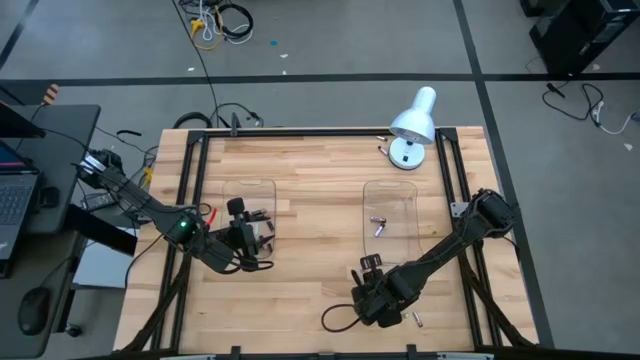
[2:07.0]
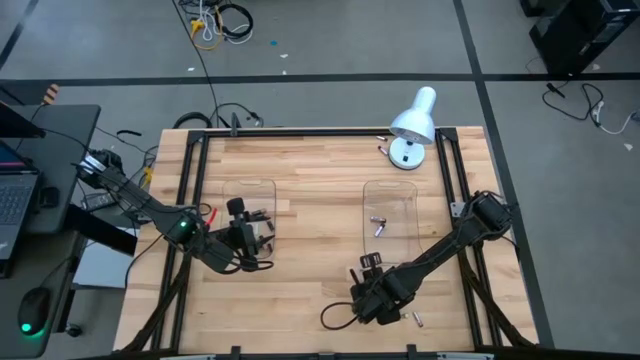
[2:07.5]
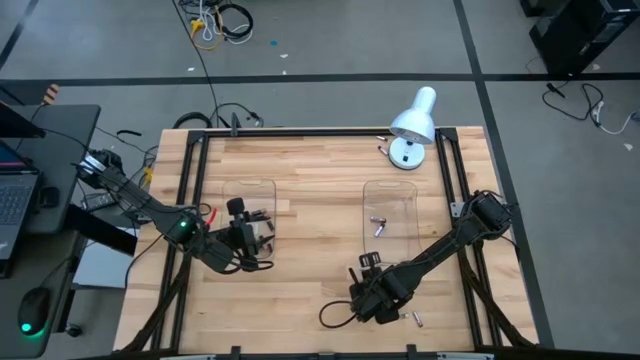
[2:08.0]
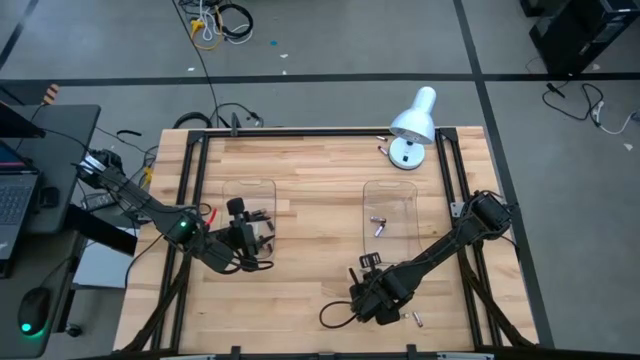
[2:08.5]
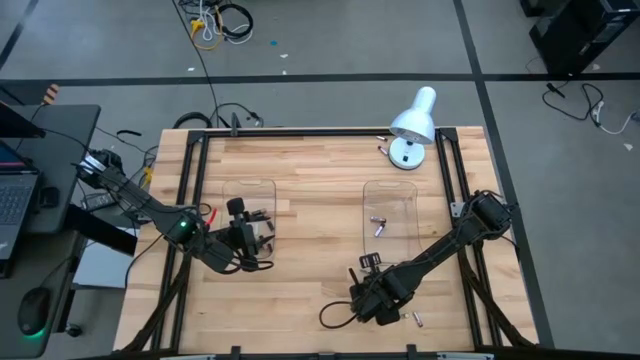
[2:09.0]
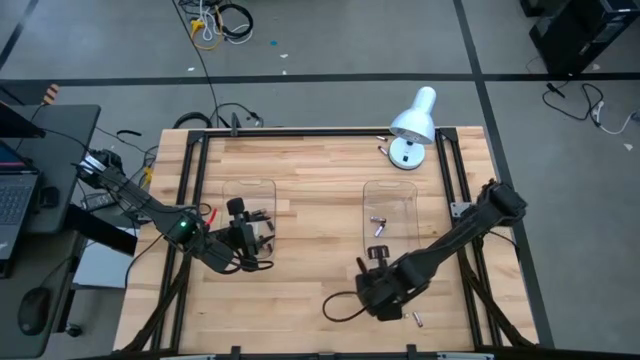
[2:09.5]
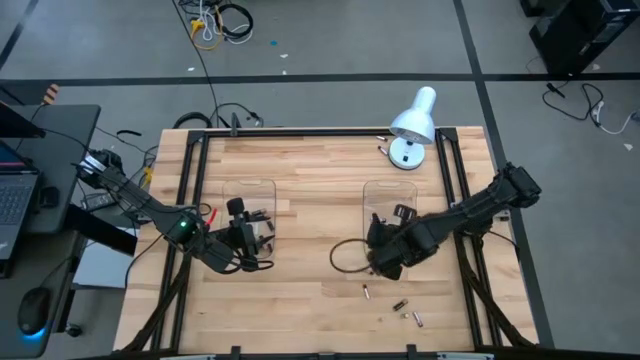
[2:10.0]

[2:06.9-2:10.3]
Task: Sort batteries
Put the silver battery into the right transparent bin

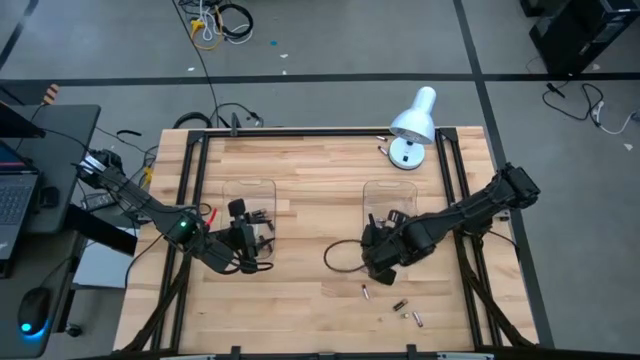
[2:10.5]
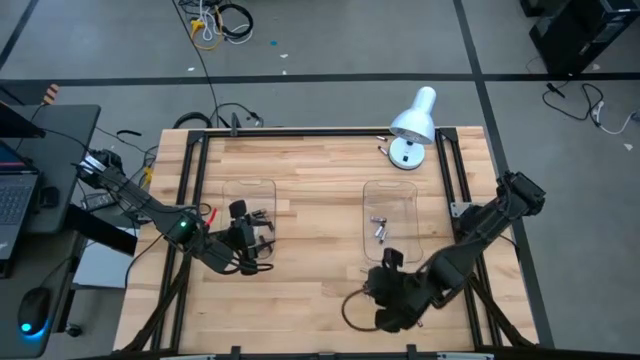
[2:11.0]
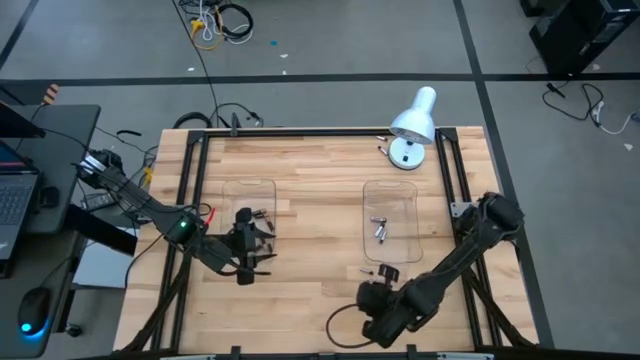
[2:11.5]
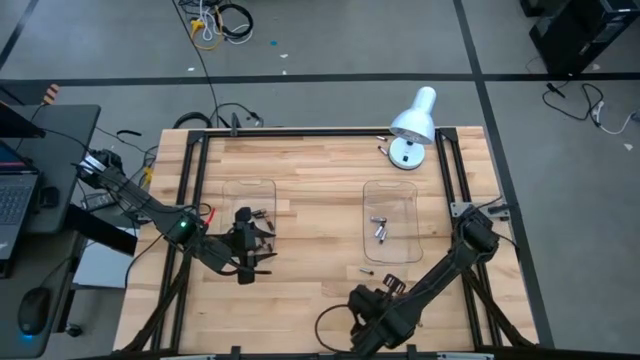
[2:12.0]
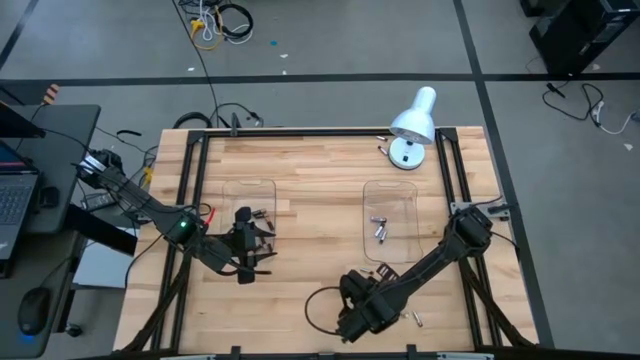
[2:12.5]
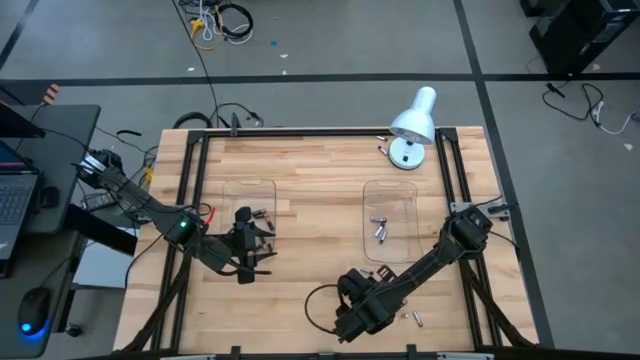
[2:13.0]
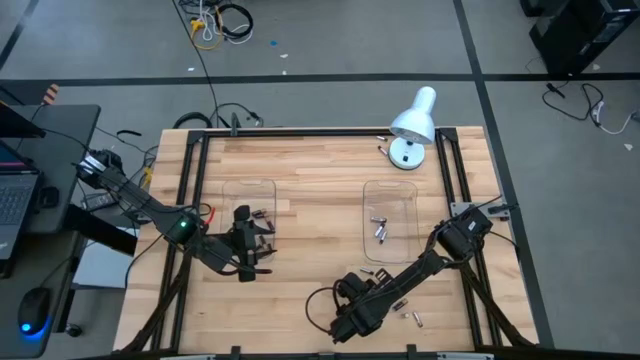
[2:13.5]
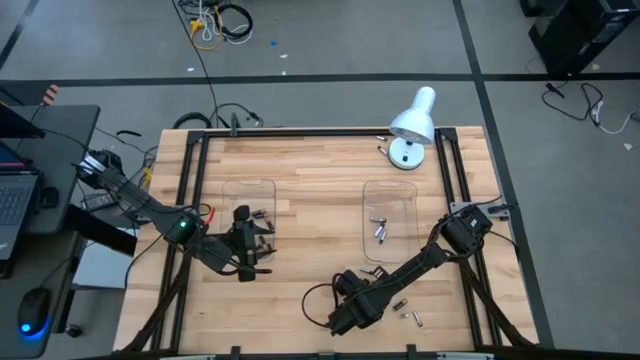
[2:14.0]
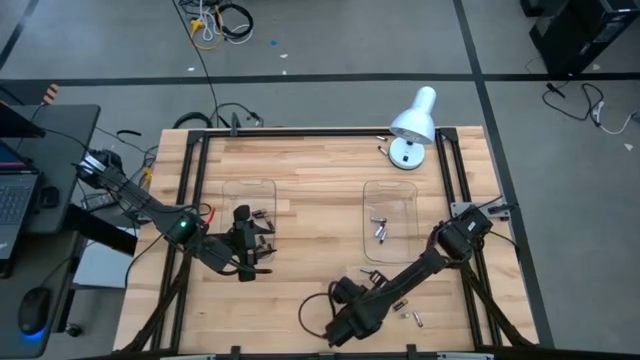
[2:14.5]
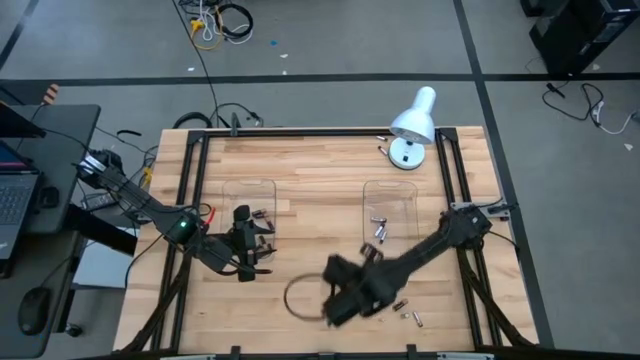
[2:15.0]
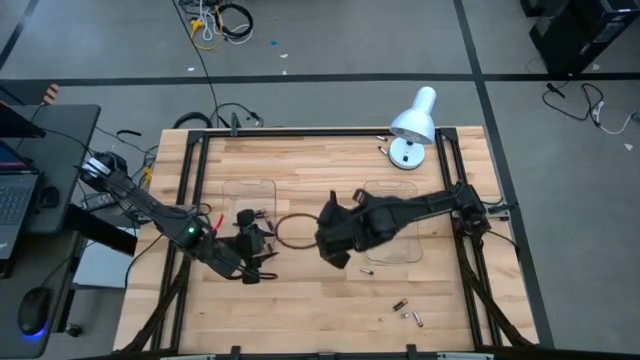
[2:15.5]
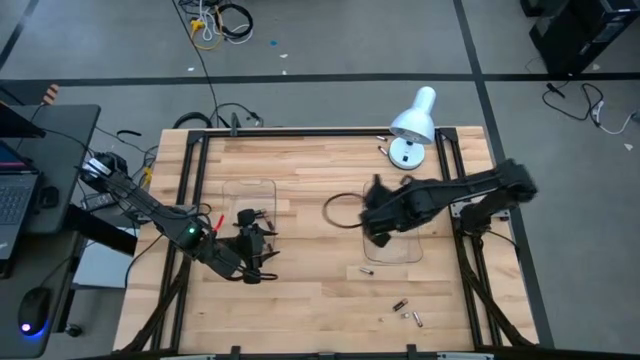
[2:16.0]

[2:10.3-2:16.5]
Put the silver battery into the right transparent bin

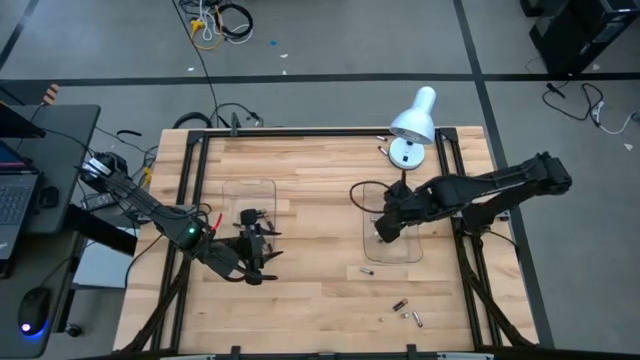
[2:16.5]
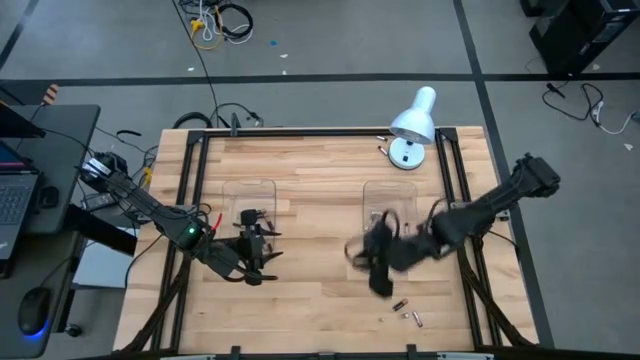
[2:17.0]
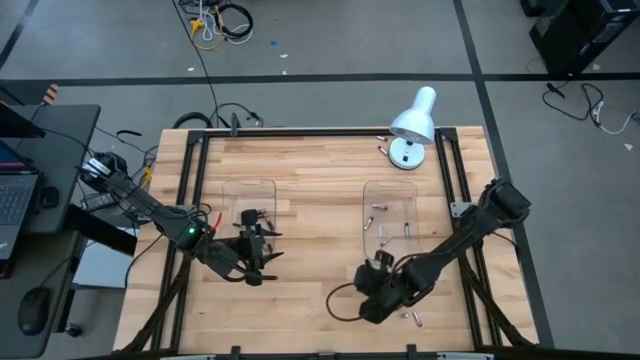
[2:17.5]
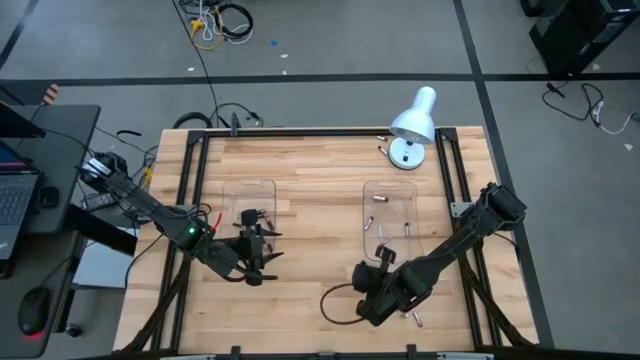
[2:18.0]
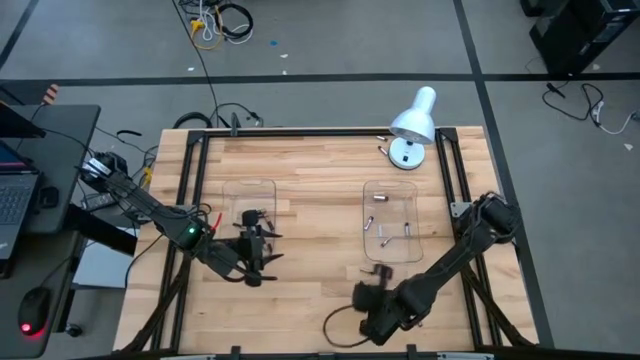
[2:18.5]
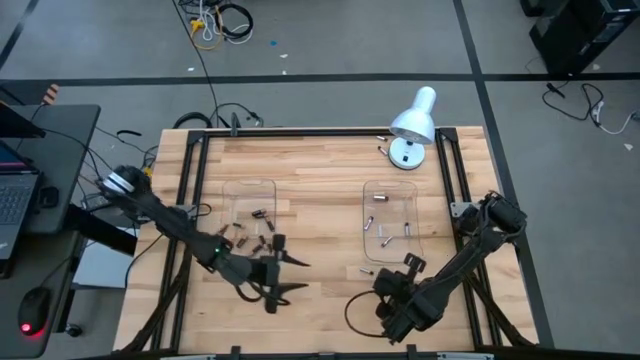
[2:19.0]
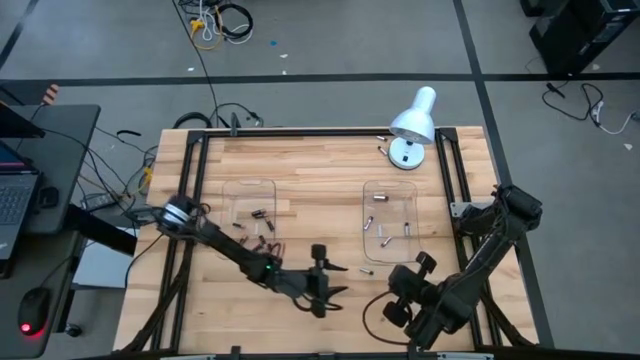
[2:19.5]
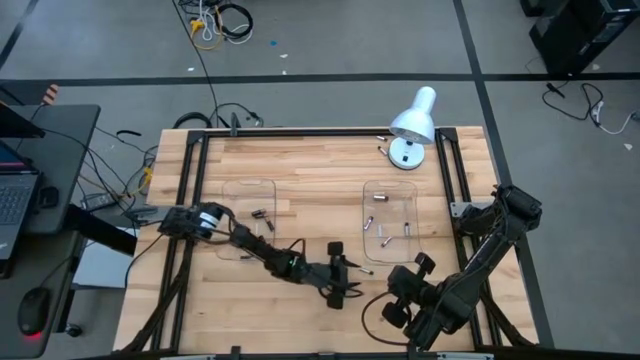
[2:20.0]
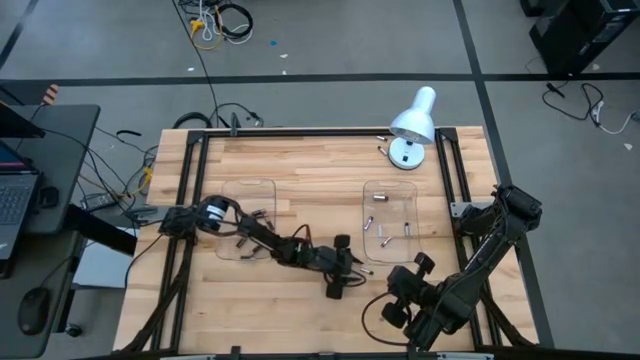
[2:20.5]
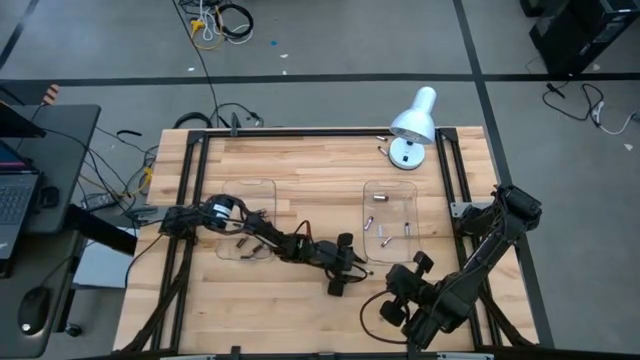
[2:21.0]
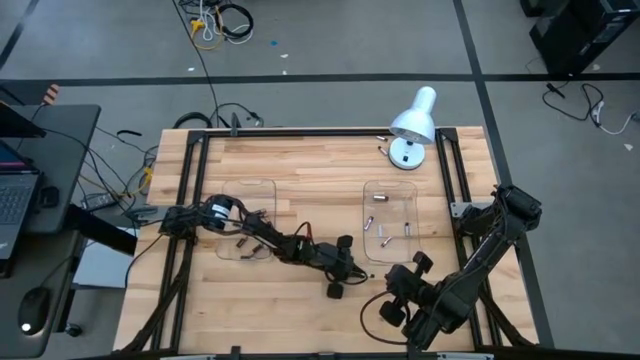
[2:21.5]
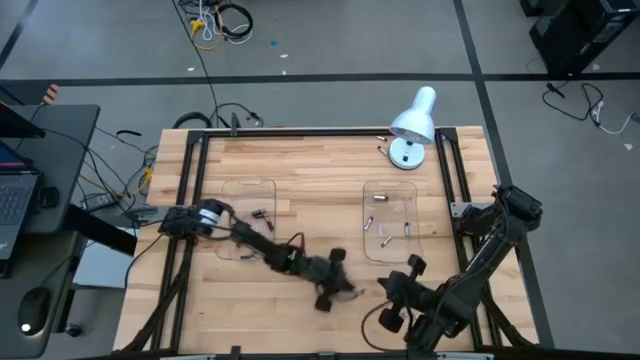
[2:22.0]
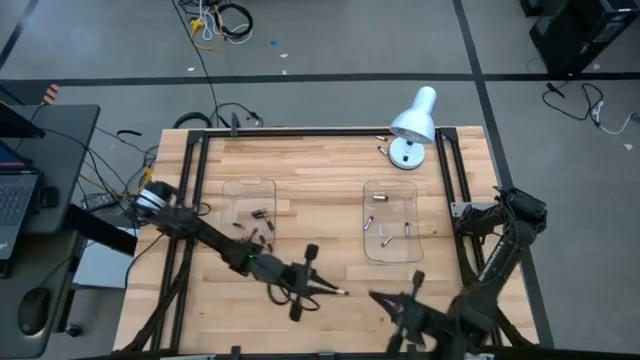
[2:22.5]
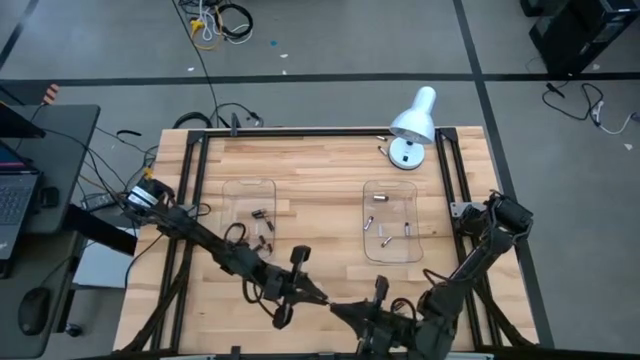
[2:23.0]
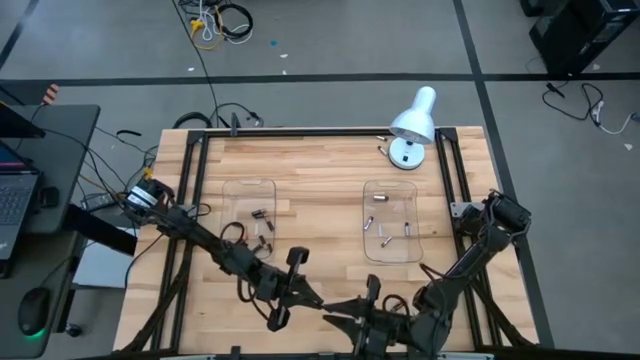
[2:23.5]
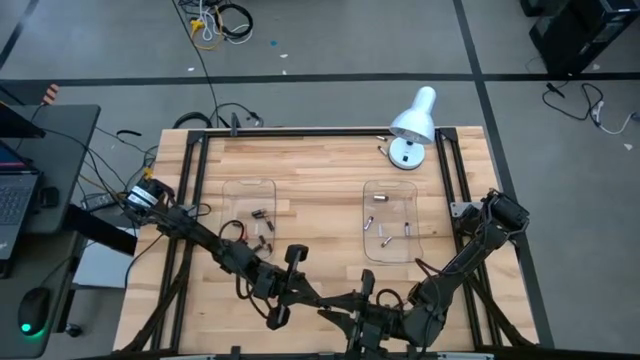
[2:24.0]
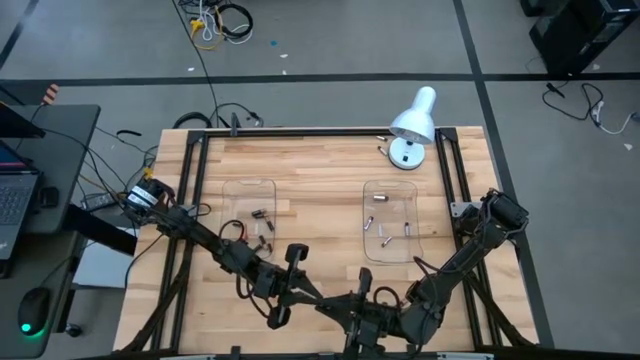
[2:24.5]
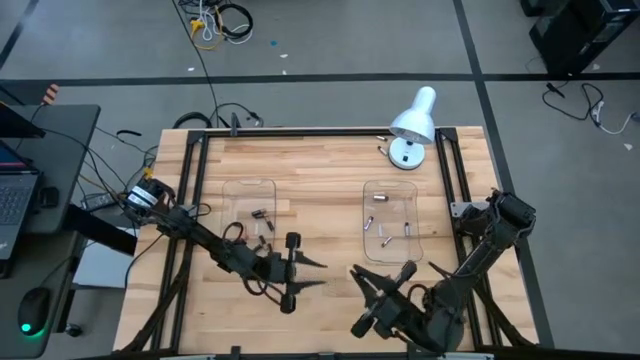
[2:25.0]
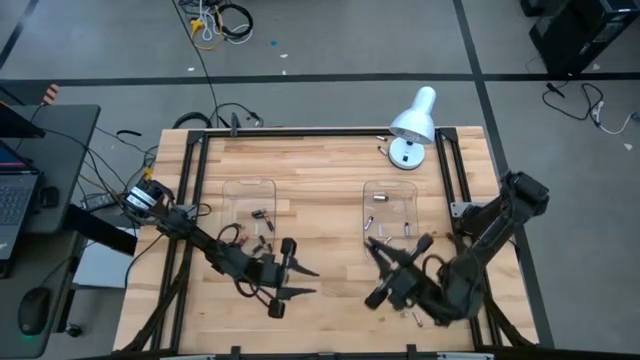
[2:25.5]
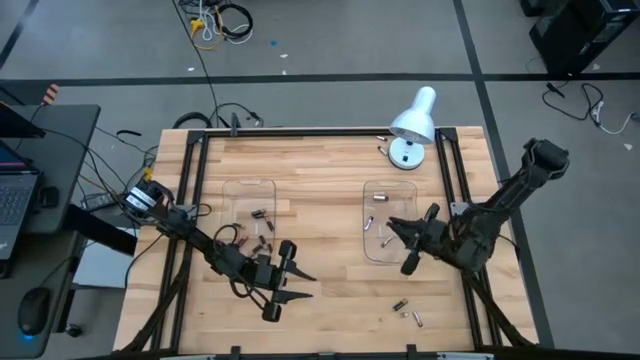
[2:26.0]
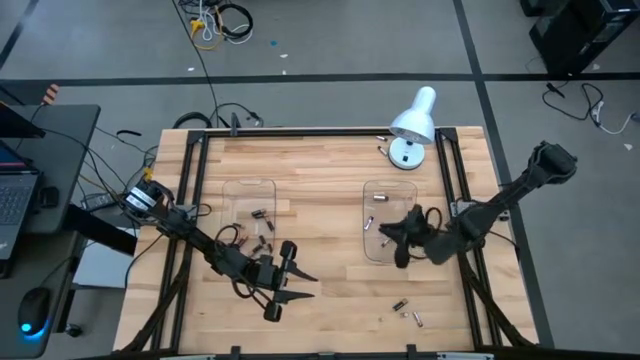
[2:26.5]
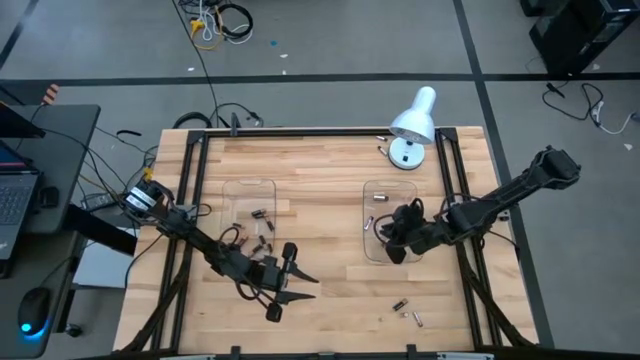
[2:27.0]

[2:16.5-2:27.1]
Put the silver battery into the right transparent bin

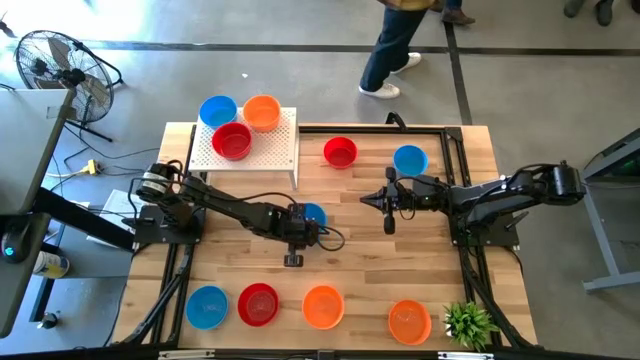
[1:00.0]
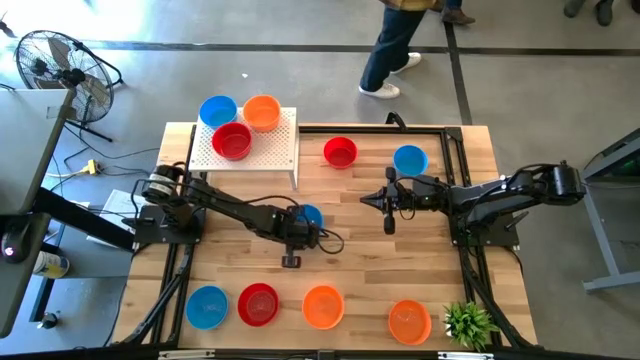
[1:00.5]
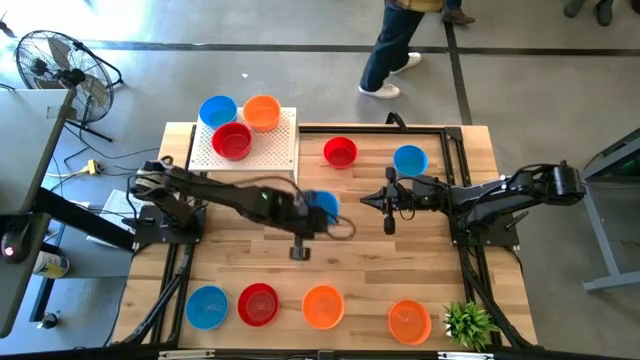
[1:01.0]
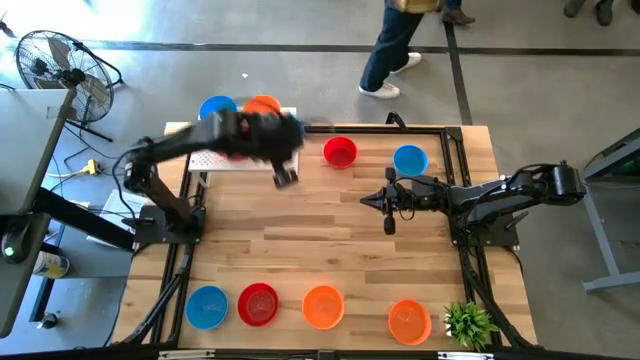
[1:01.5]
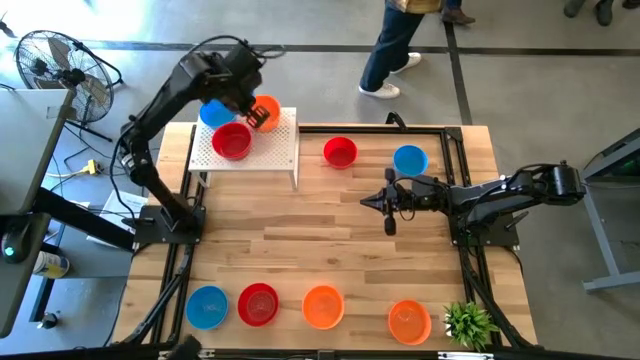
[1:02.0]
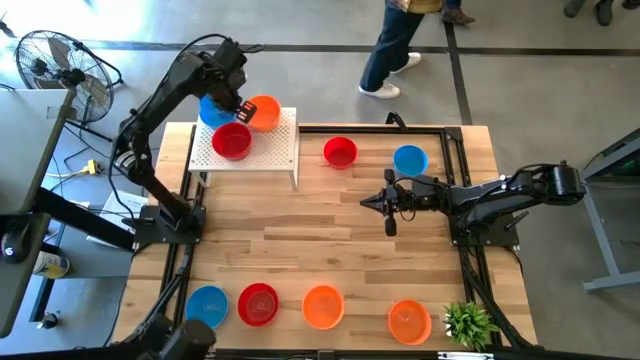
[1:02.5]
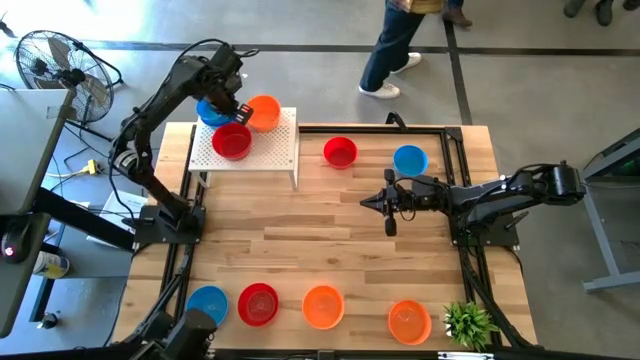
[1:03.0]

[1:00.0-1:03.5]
Task: Pick & Place Mini bowls
Stack the blue bowl on top of the blue bowl on the shelf
